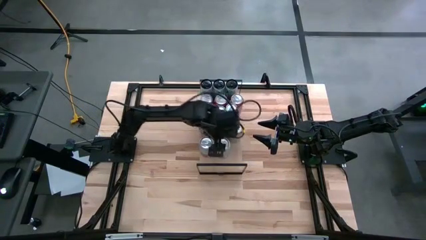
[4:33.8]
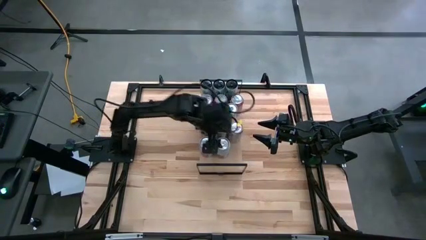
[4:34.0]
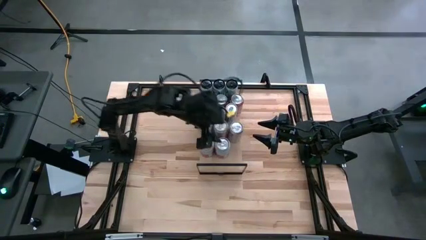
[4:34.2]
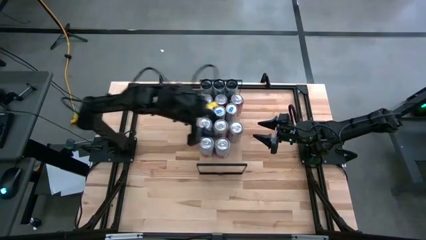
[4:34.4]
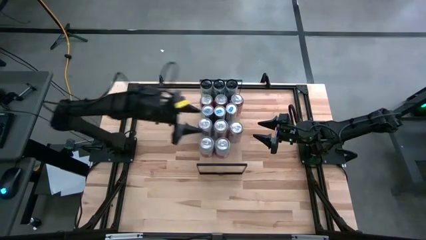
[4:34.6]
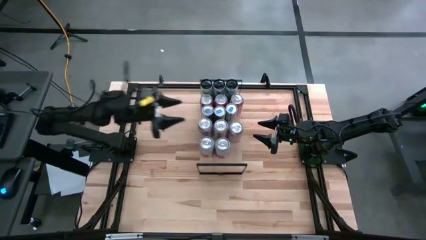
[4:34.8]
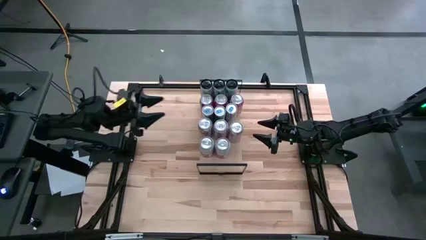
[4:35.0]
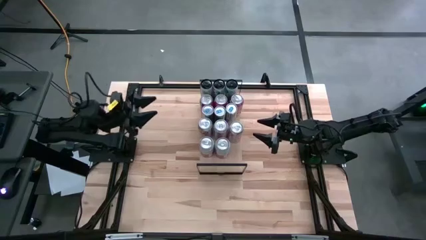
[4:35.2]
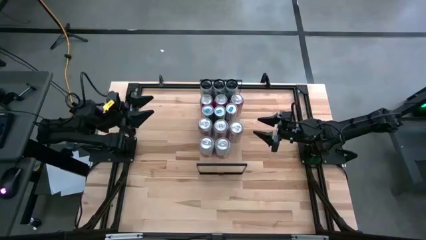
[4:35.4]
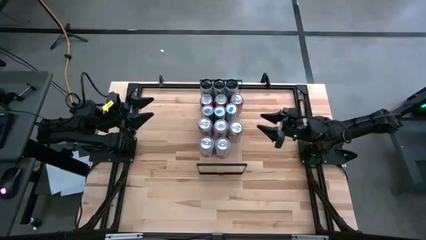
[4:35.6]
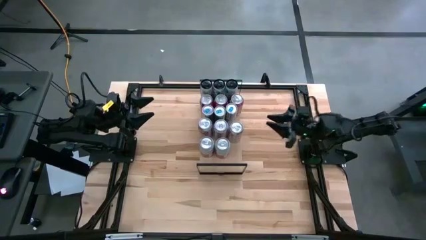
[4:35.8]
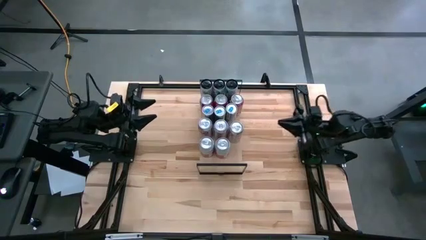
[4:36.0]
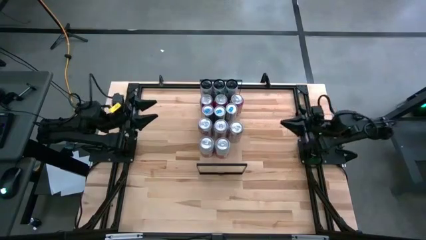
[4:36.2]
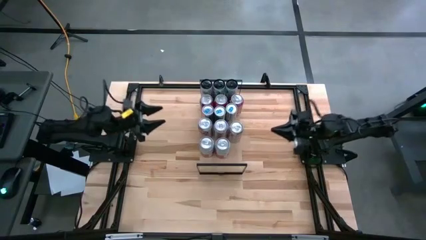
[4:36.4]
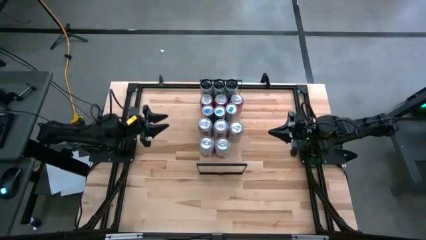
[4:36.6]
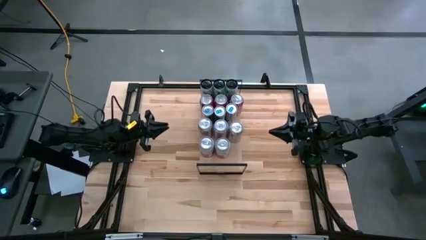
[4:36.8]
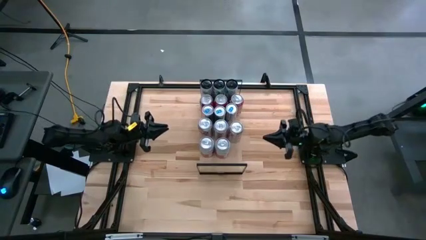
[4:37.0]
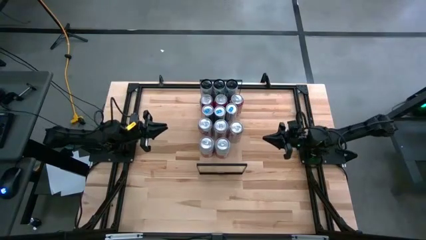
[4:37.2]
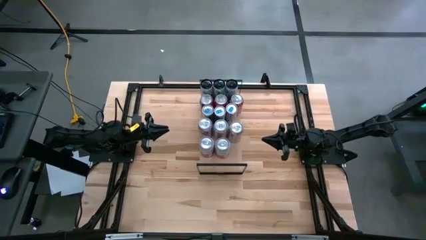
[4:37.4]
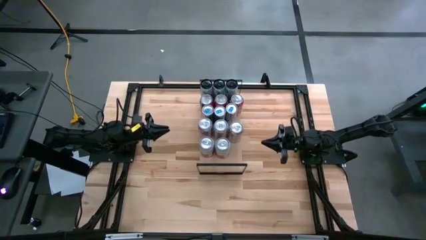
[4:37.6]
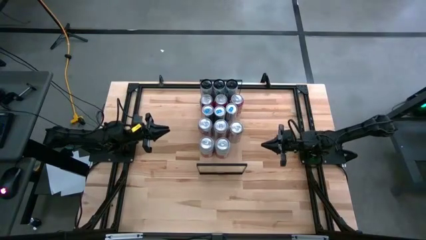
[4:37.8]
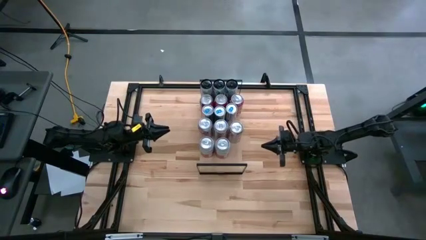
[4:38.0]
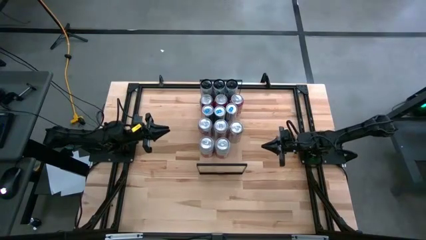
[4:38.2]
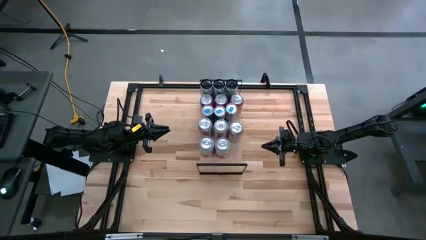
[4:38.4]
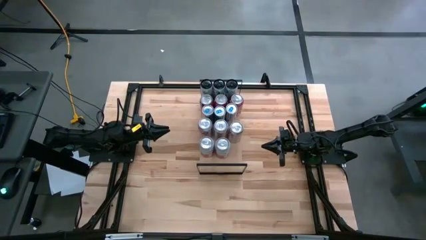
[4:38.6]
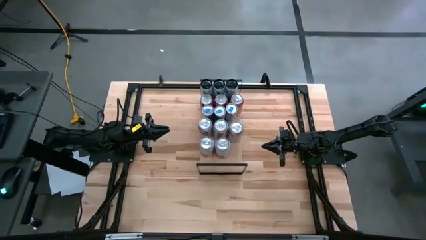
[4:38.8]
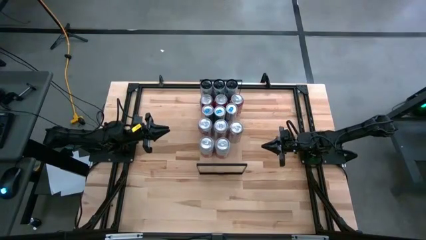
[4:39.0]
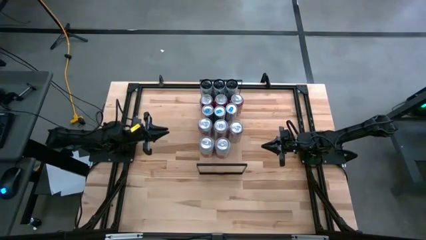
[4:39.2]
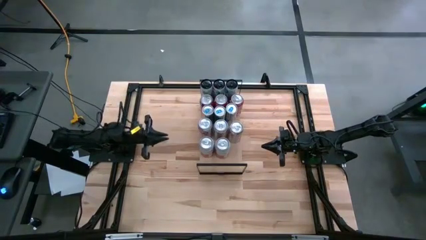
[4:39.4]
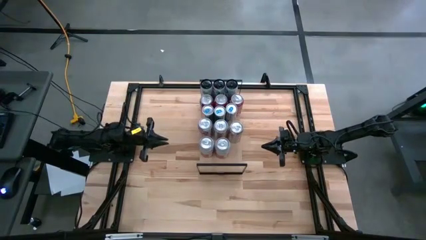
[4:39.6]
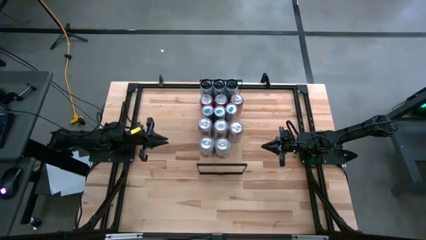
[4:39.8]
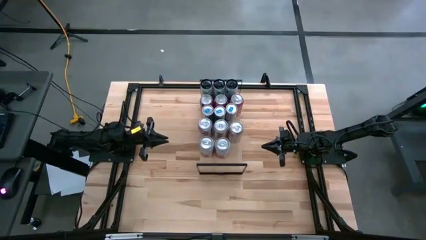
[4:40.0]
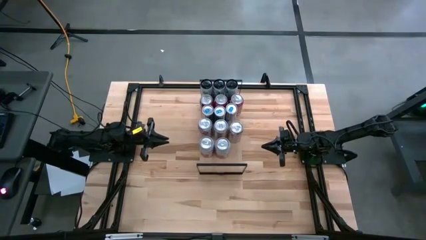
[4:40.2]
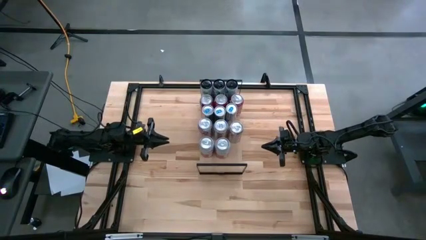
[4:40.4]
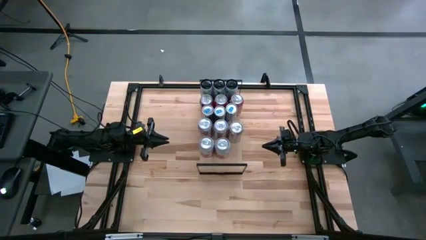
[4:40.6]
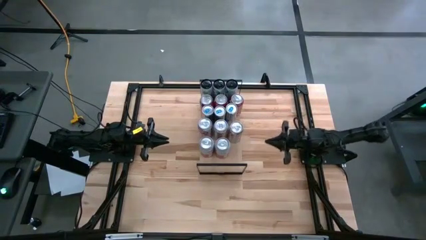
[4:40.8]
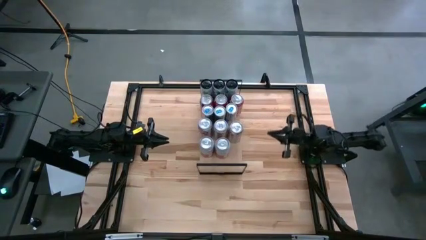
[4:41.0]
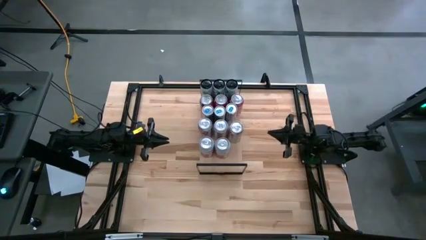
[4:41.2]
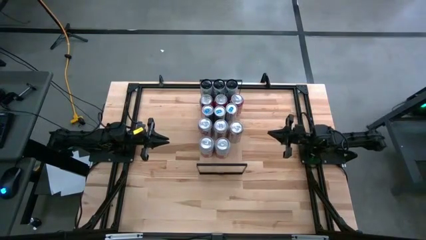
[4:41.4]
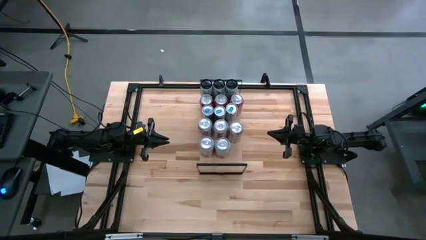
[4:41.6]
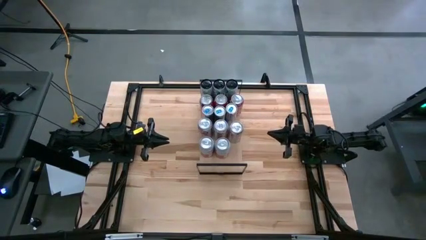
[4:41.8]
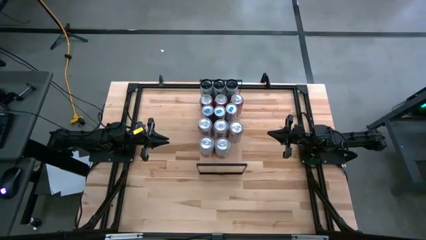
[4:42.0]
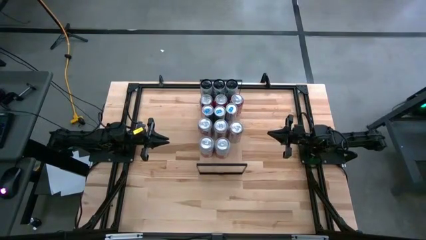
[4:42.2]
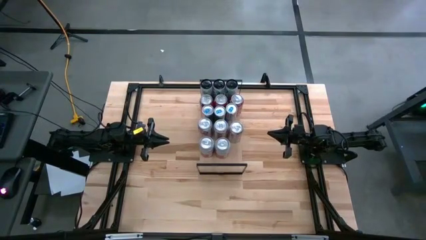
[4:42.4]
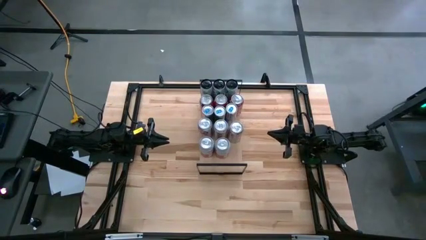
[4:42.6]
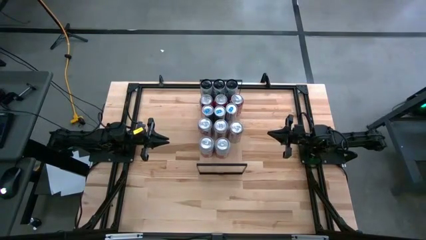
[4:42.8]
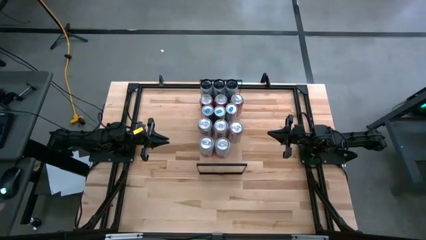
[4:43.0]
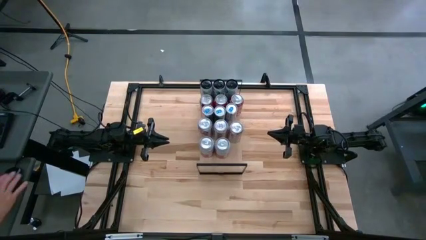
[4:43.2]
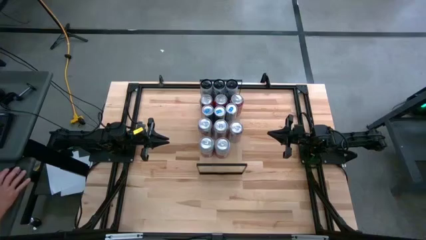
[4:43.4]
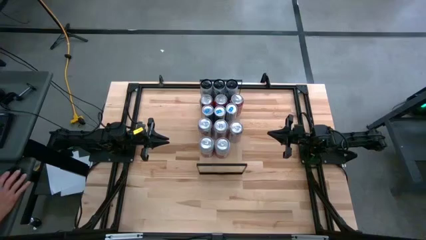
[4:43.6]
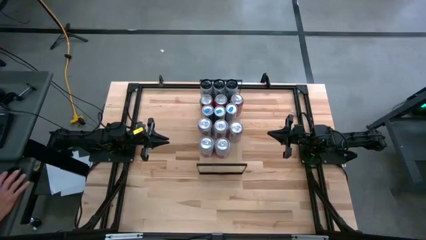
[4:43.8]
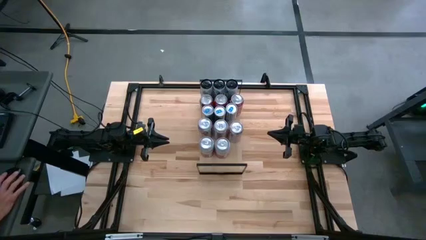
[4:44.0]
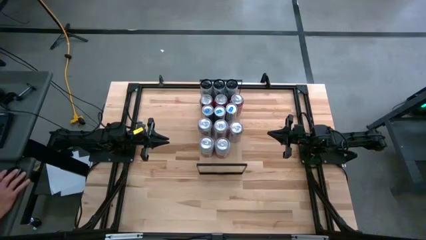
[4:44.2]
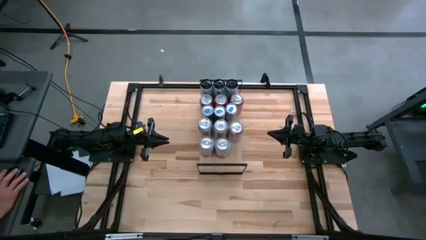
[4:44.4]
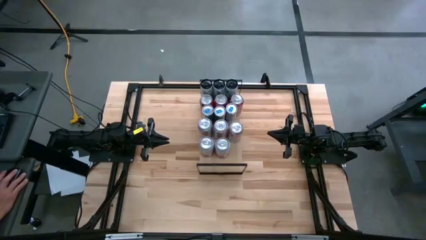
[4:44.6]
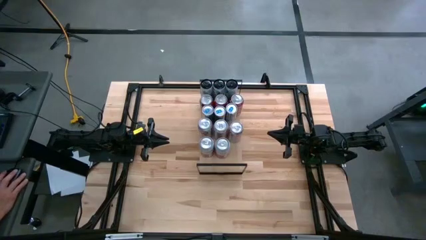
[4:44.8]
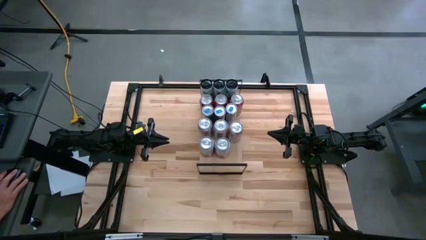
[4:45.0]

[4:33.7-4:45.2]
Task: Place canned beverage on shelf
Return to Home Position

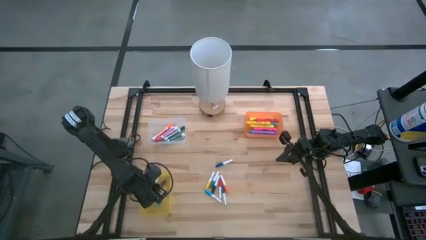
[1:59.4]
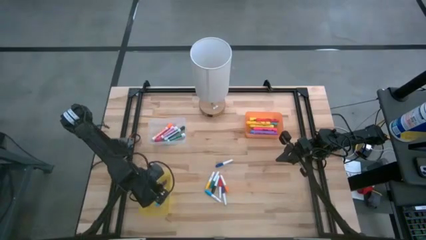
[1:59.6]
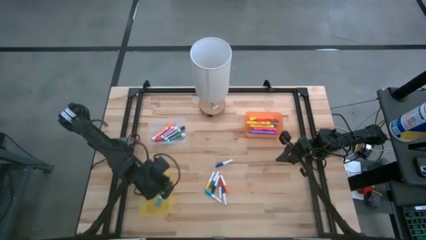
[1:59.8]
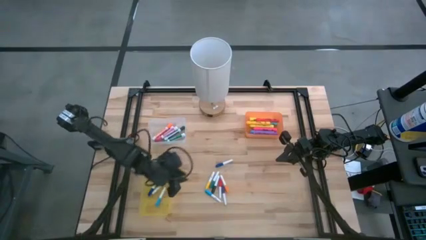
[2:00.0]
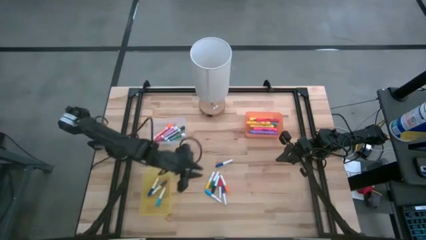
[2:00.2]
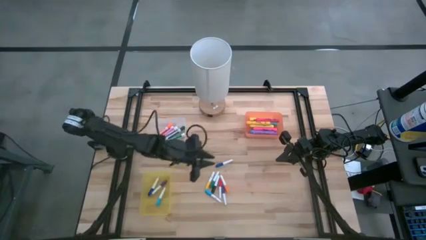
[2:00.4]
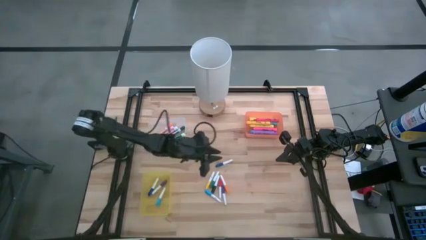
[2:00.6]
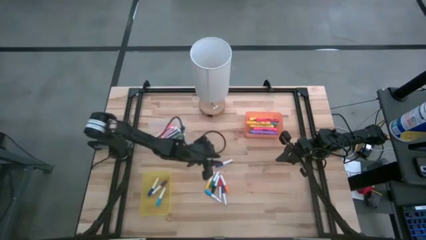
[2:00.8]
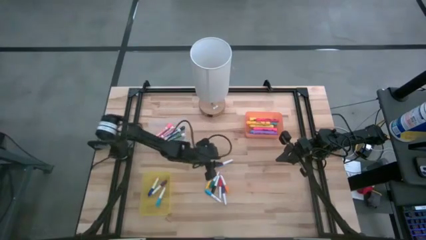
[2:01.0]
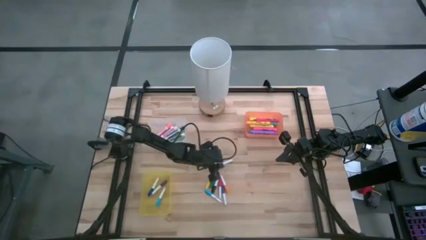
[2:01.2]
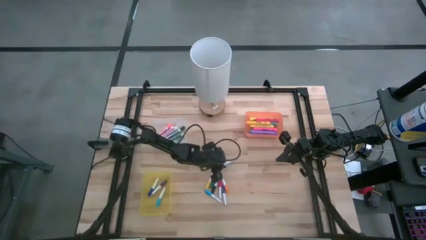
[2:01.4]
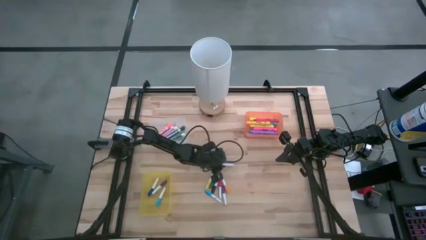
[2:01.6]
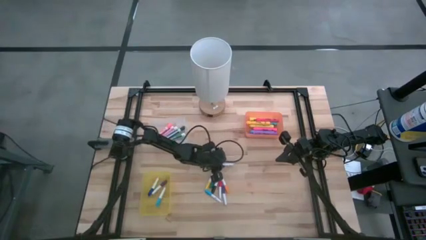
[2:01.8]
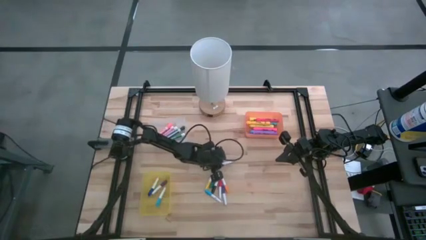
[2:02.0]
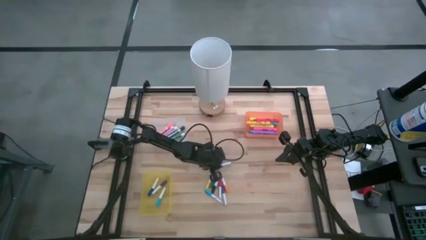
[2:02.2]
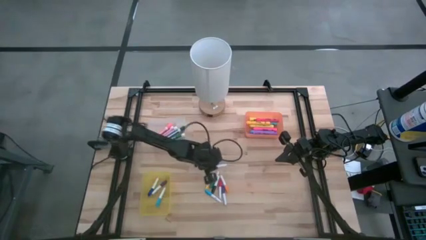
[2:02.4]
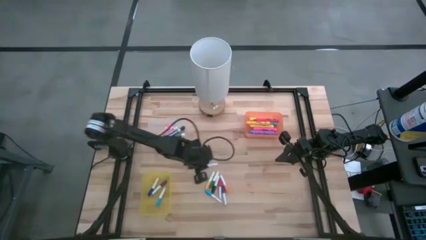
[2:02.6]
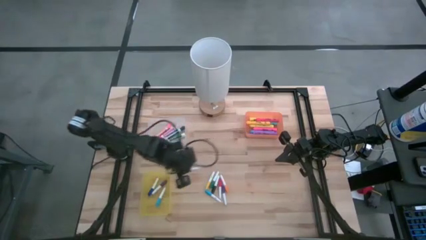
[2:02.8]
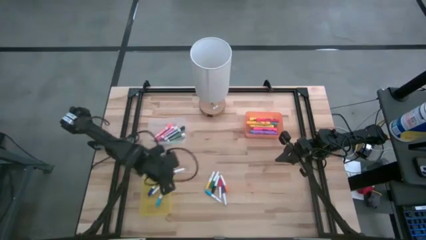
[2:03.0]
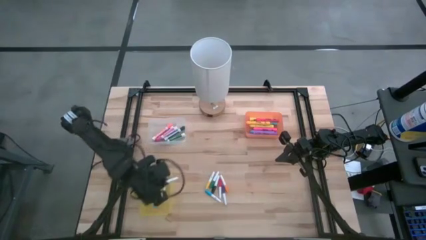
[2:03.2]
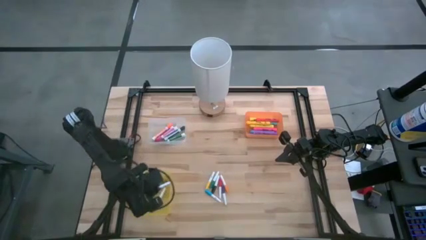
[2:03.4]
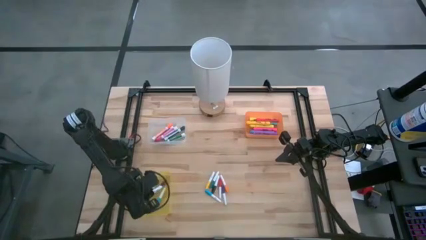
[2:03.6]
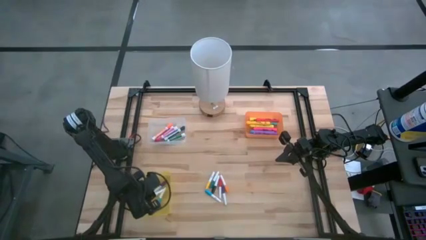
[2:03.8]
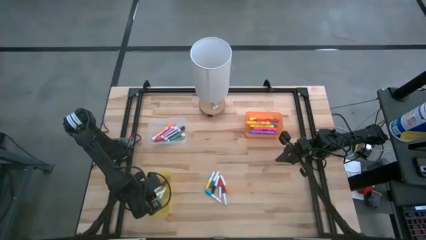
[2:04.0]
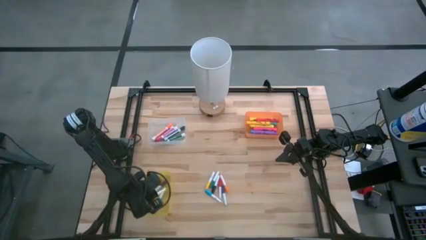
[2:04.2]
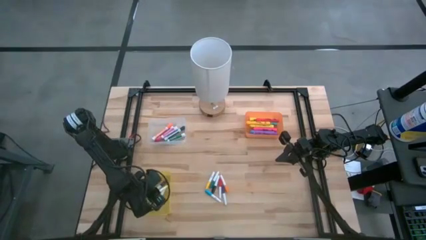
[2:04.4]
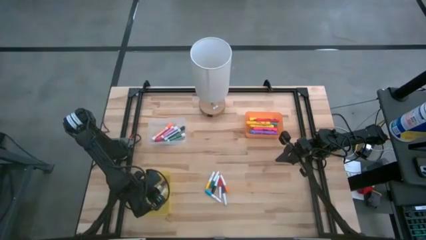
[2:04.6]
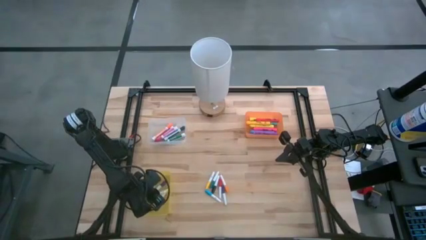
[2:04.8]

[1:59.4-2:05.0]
Task: Pick & Place Markers
Put the small blue highlighter pen into the yellow bin
